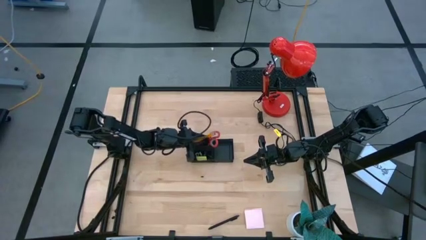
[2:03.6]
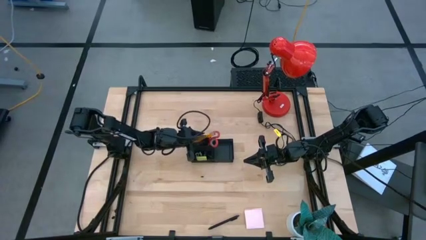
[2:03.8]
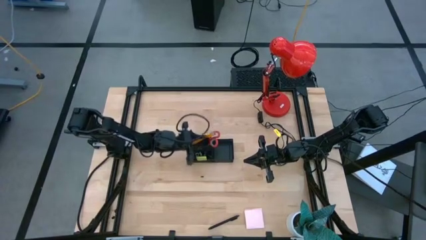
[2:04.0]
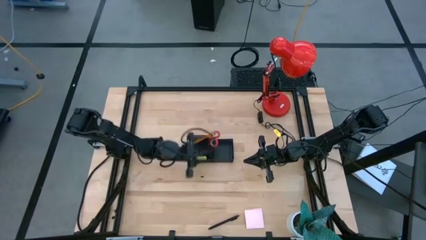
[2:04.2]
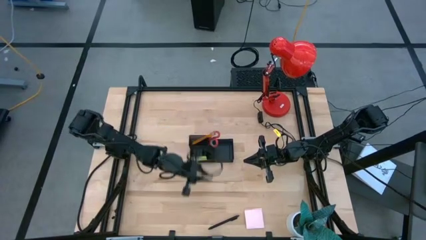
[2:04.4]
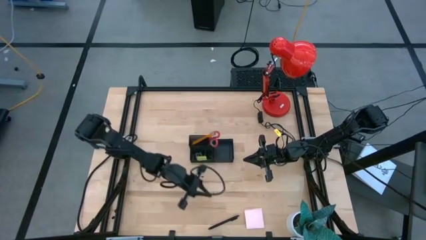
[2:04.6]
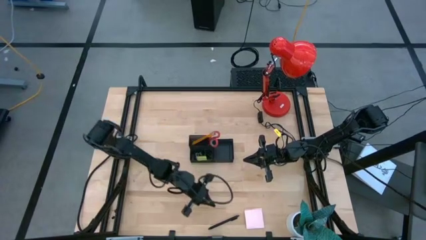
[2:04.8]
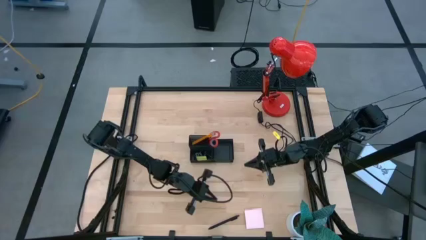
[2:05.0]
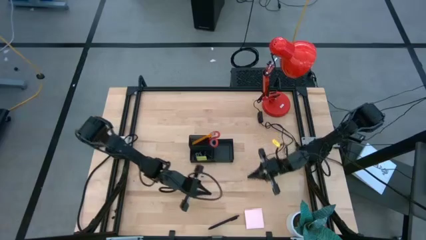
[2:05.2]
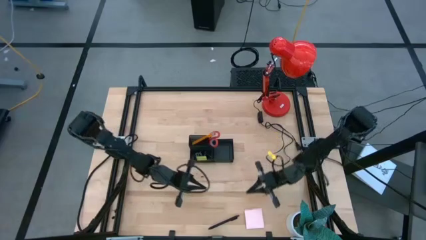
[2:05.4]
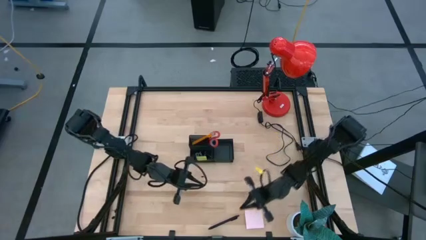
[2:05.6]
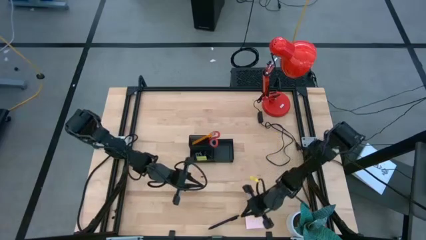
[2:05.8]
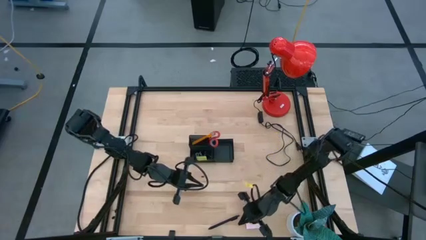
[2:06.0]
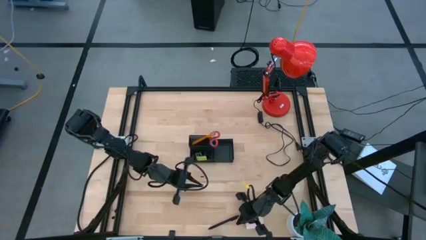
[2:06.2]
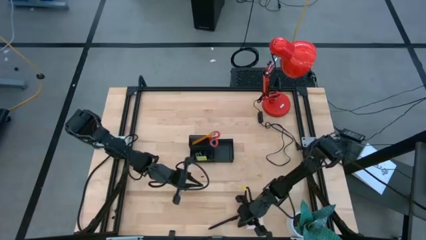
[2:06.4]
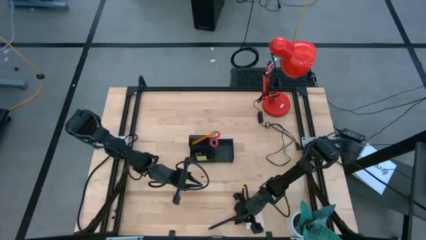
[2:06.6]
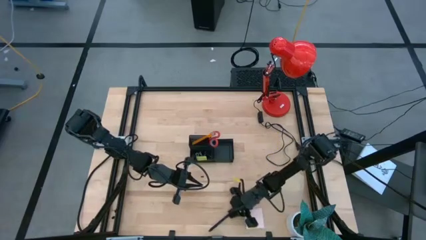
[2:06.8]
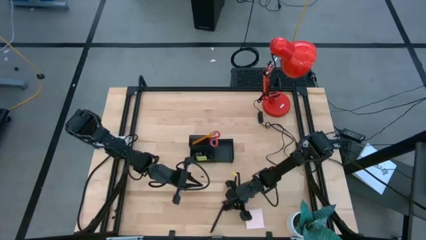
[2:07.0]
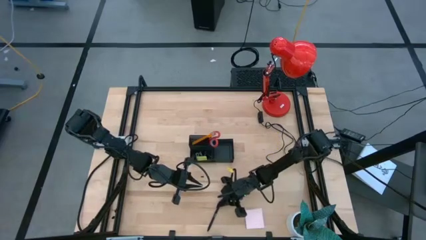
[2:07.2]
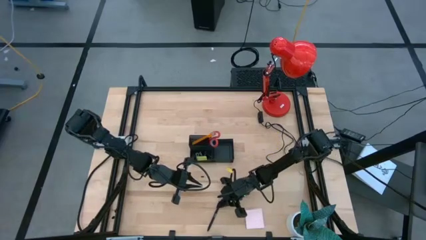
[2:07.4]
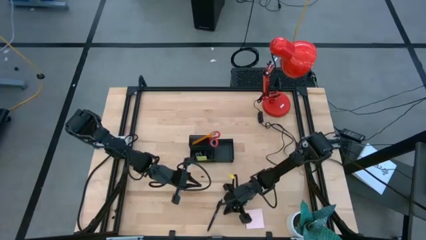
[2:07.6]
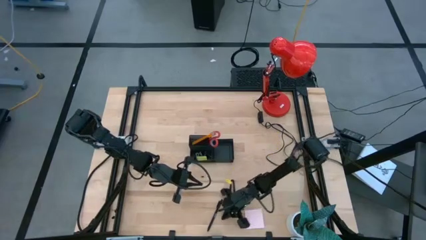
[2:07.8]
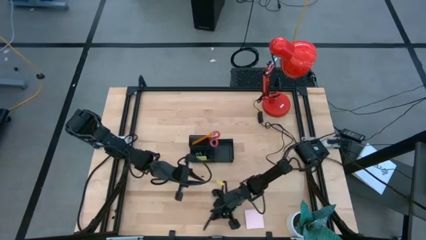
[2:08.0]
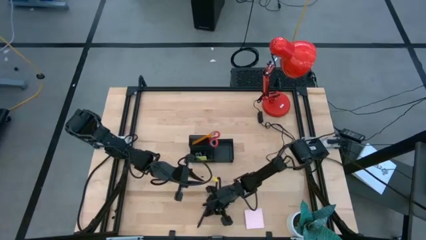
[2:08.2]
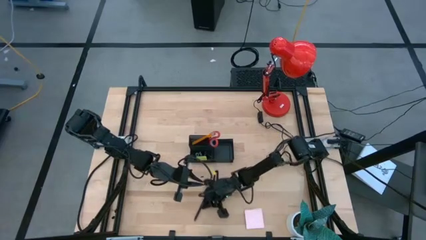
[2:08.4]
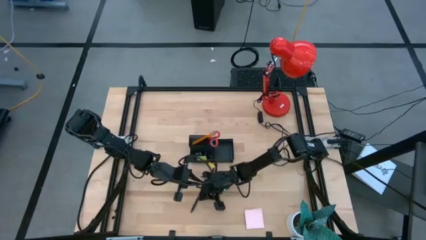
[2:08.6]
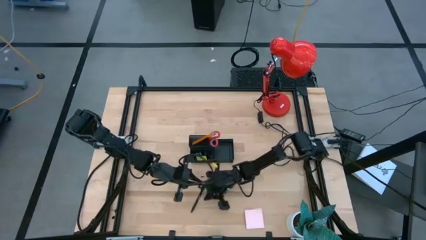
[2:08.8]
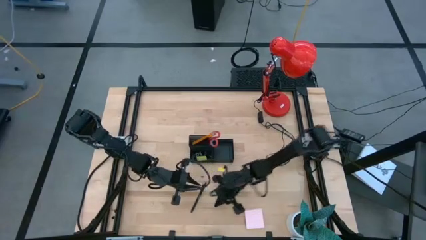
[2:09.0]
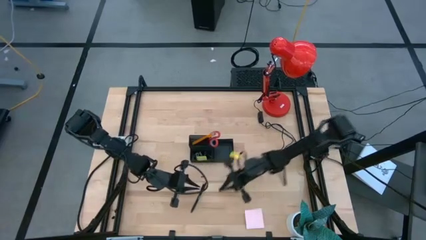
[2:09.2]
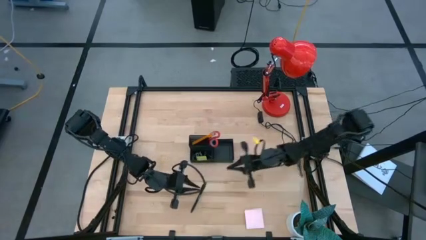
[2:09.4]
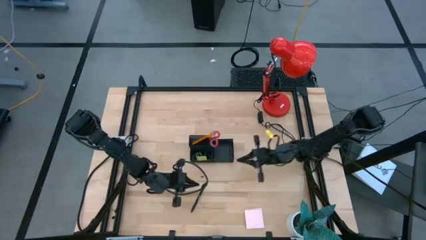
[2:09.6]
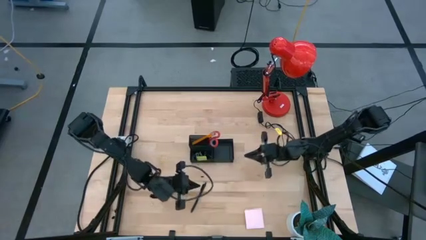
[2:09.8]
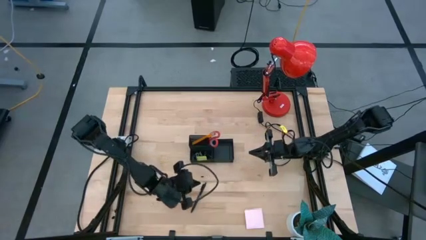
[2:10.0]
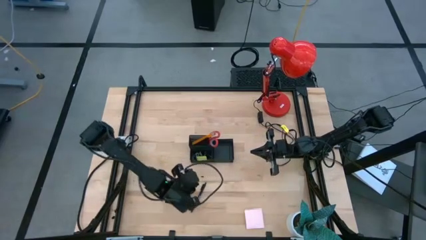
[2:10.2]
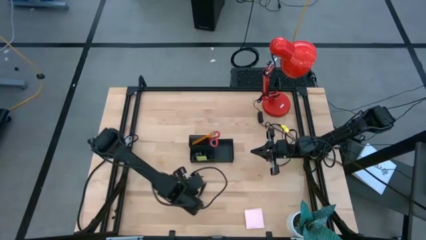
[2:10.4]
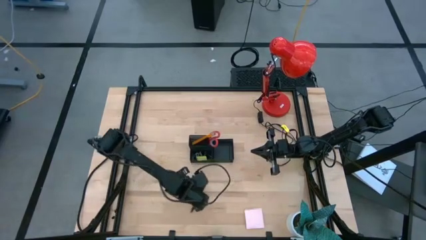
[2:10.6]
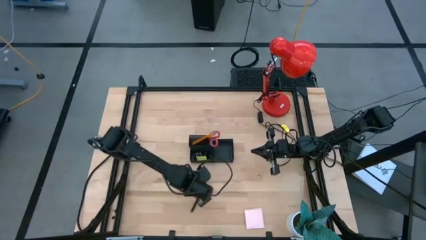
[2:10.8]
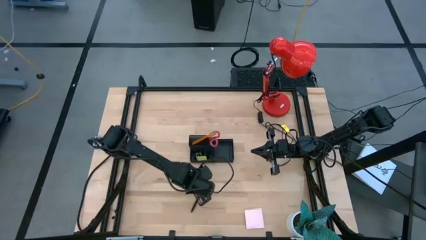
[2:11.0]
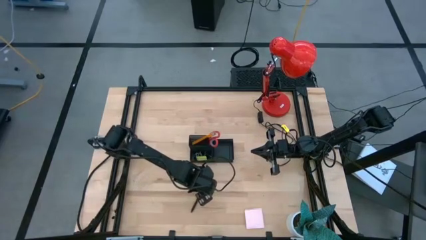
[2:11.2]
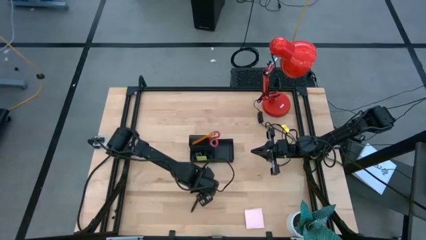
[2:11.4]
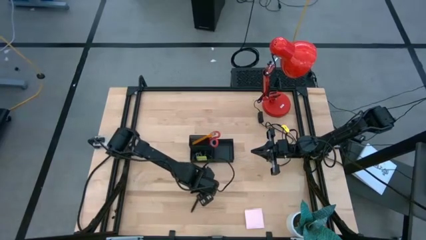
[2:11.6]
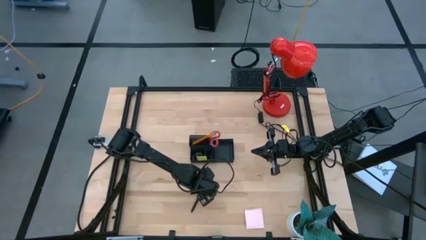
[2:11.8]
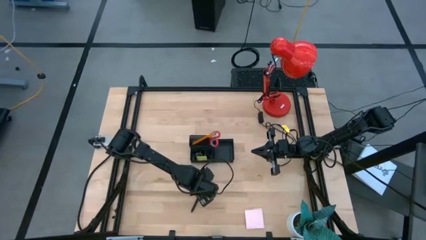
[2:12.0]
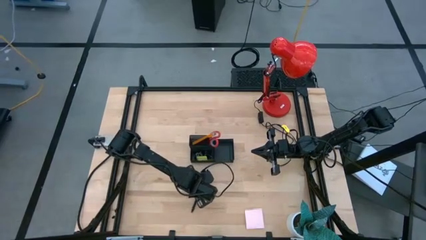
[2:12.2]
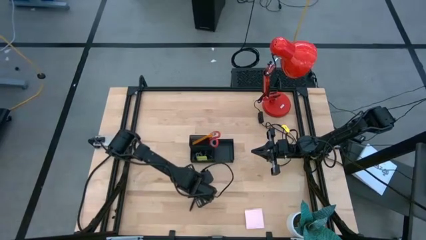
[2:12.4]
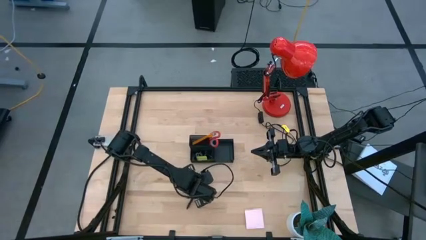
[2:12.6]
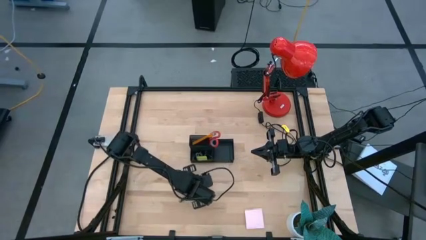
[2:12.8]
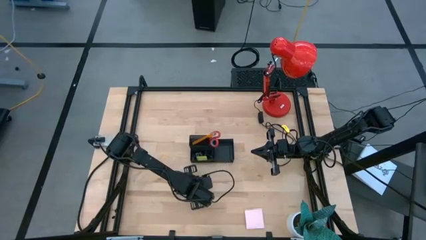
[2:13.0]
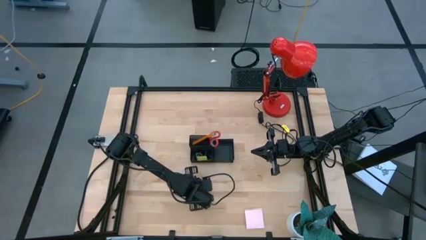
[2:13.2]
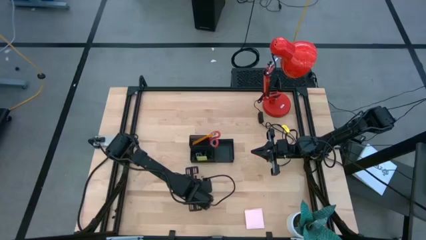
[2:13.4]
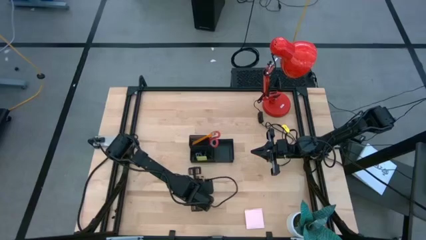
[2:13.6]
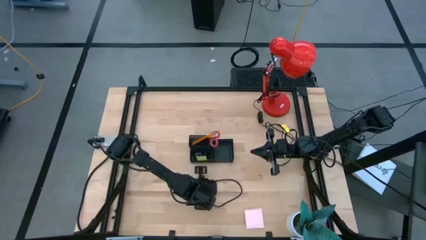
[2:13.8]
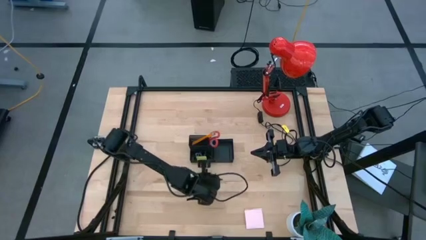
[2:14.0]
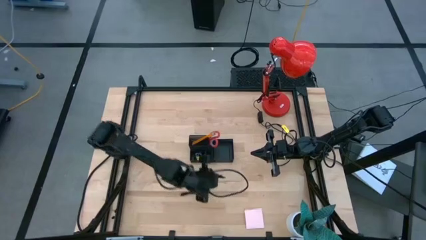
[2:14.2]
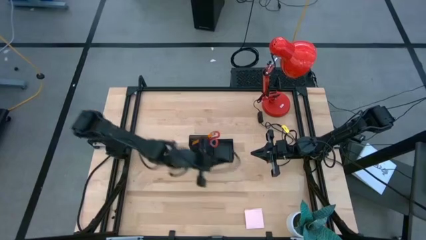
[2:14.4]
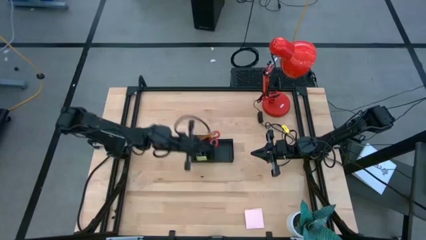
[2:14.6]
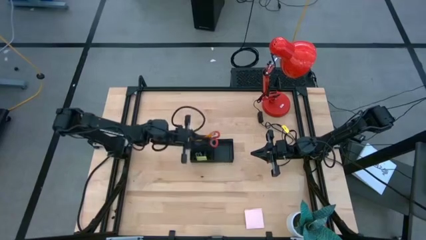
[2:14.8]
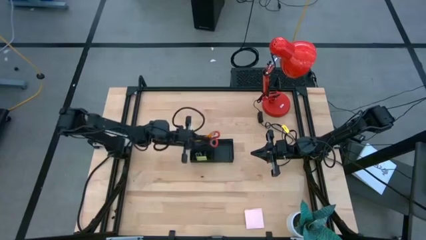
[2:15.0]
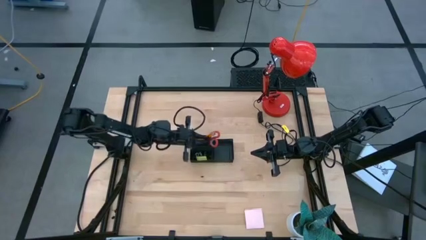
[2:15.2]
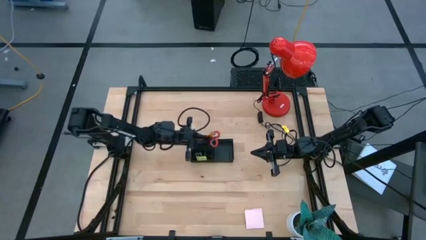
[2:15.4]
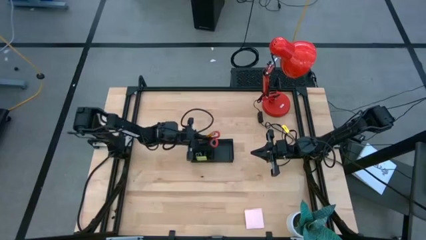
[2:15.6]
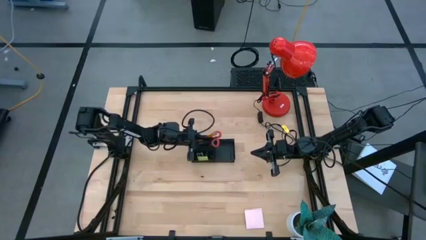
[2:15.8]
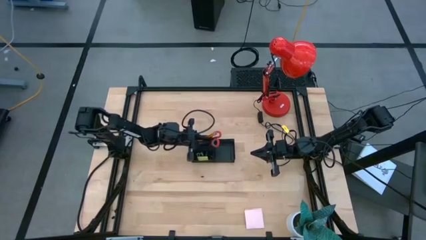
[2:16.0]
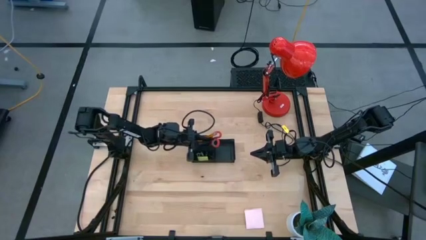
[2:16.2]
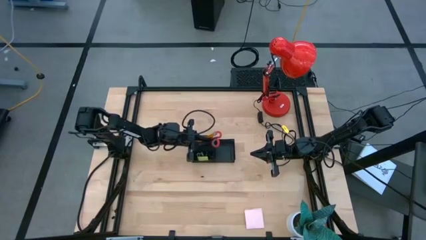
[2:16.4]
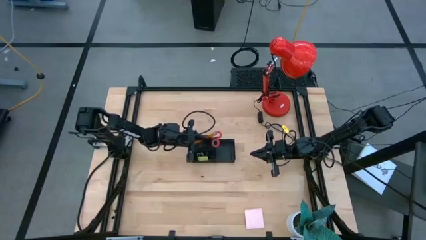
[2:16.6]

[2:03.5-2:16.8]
Task: Pick and place office supplies into organizer
Put the black pen into the black desk organizer

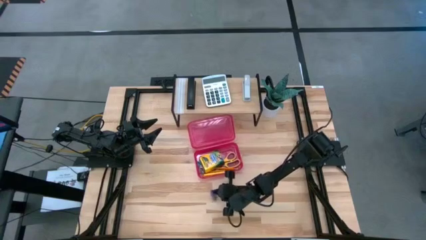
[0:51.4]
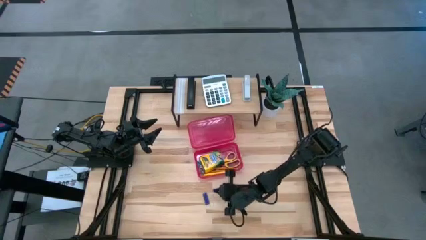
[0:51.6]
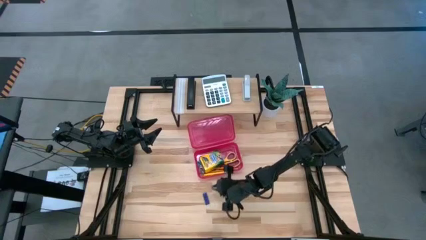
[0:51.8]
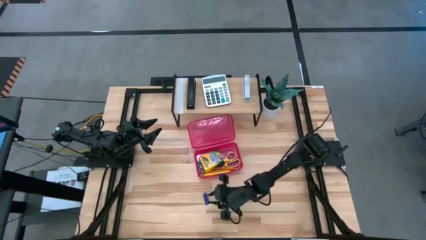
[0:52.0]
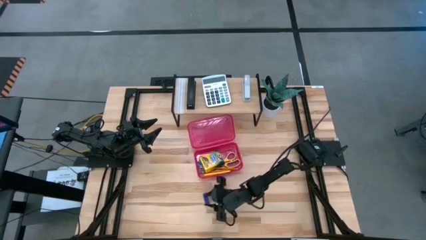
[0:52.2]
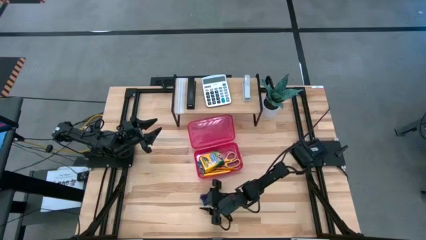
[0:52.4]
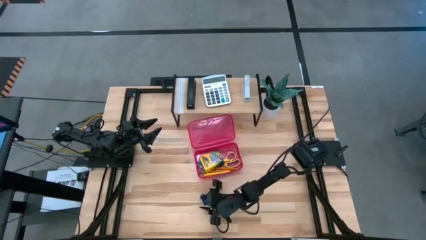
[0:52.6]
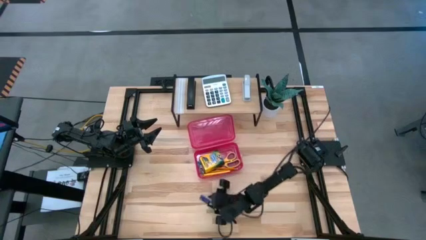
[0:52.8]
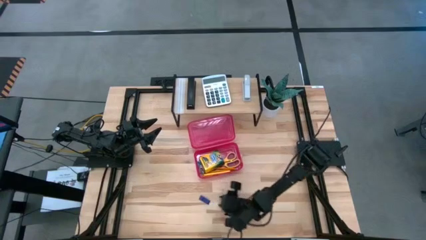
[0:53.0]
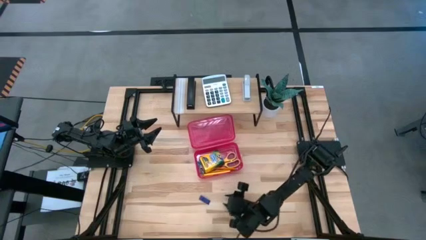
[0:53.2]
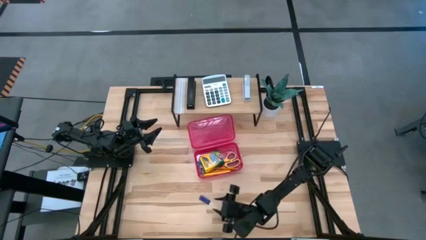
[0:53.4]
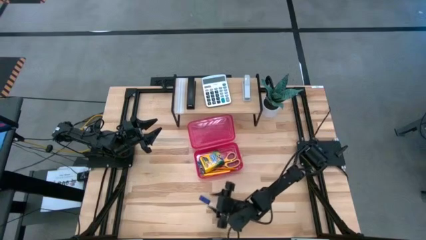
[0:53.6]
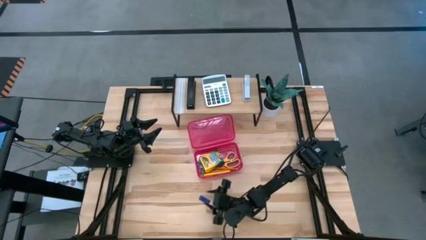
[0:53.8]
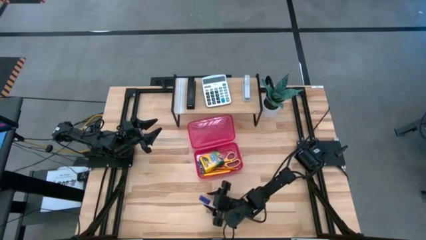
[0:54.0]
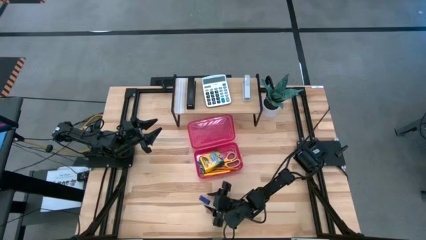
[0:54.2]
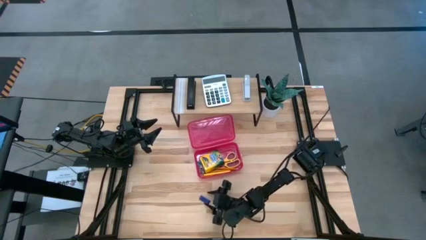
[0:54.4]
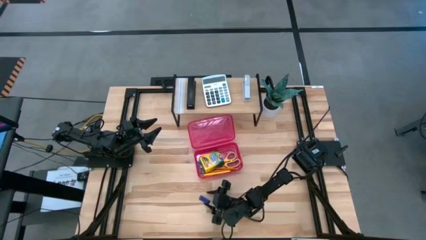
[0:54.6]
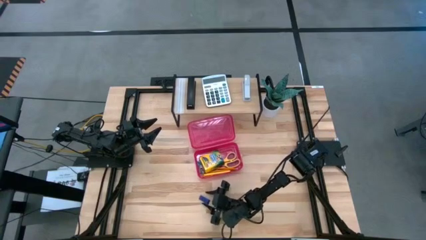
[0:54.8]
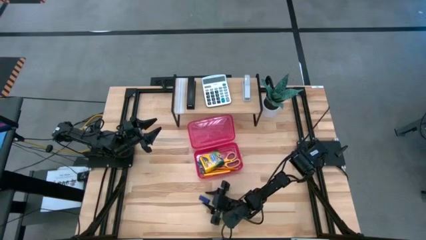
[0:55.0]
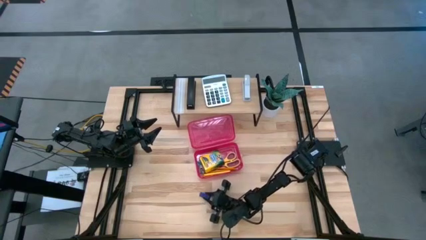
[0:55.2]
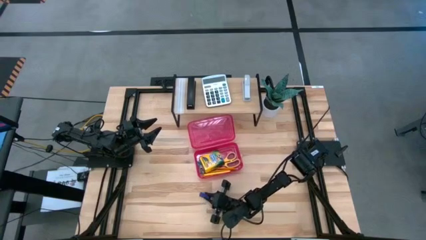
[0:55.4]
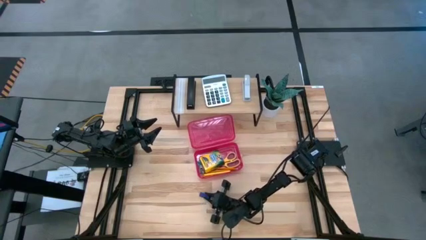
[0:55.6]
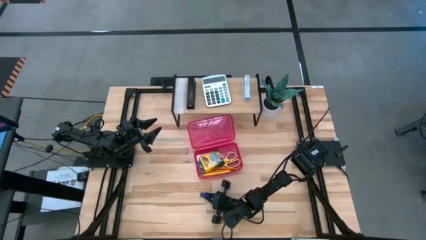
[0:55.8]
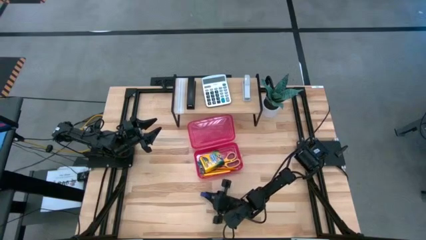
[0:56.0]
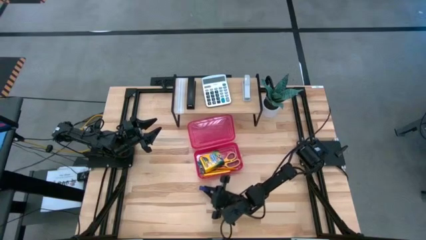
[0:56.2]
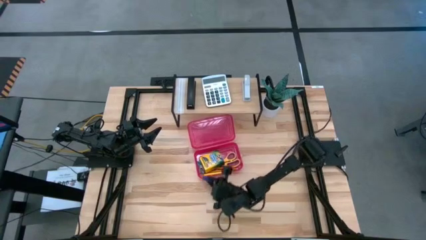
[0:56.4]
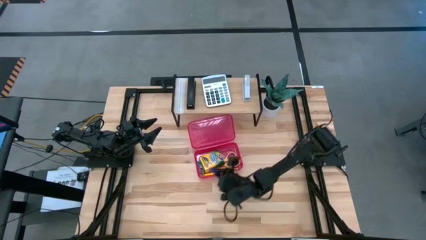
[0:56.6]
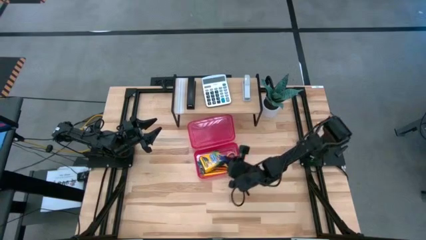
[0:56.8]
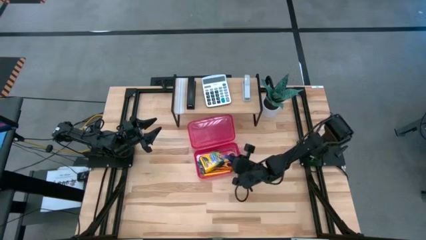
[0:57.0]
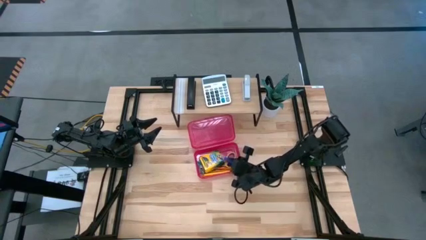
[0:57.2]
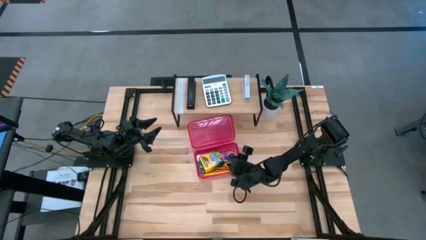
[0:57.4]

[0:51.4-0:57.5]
Task: Pack school essentials
Put the blue eraser into the red supply box
